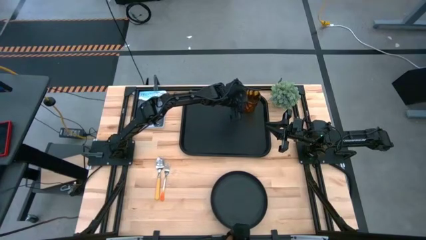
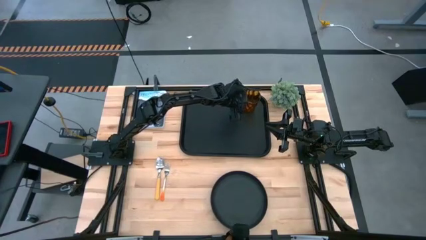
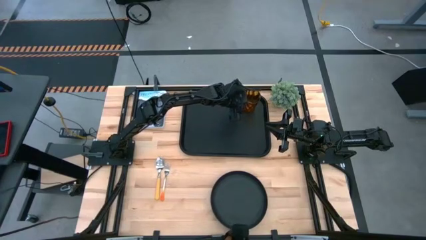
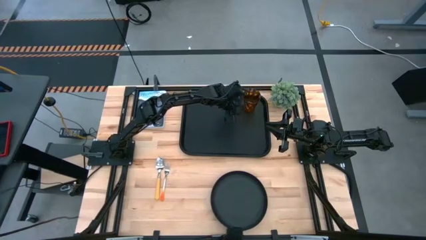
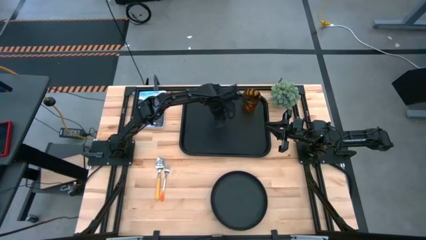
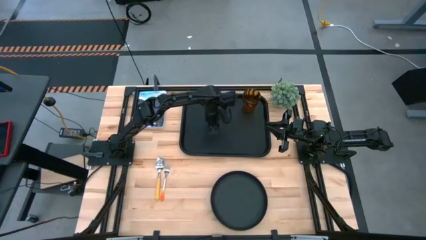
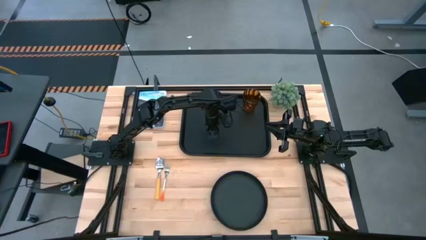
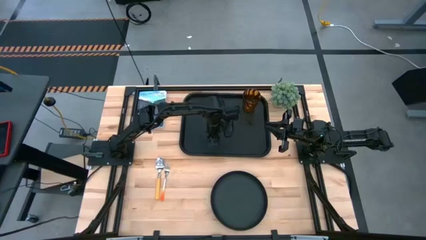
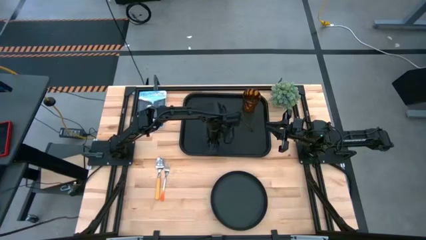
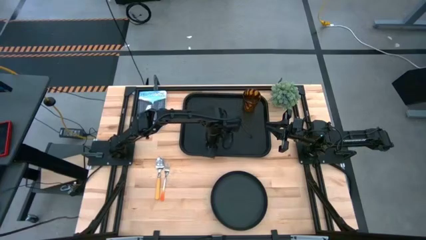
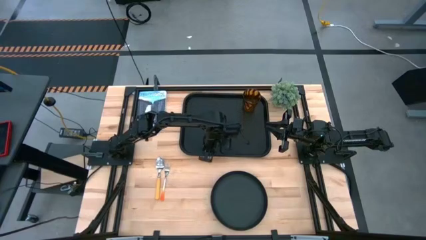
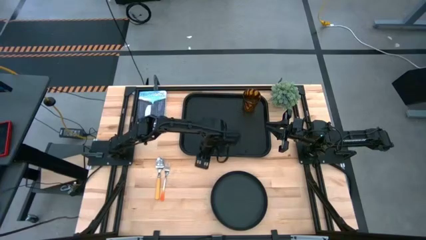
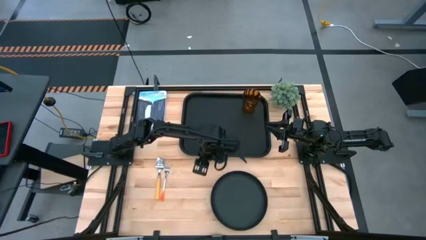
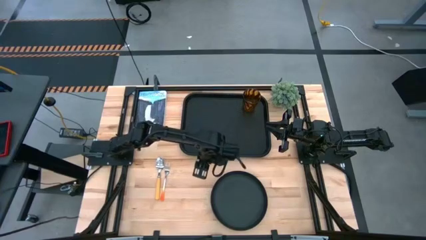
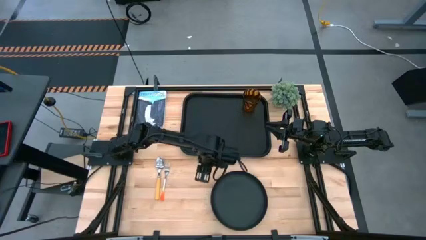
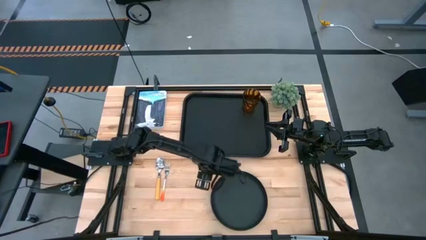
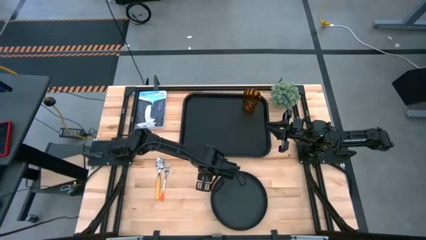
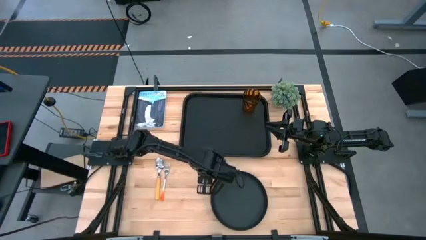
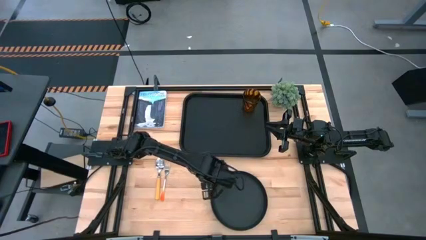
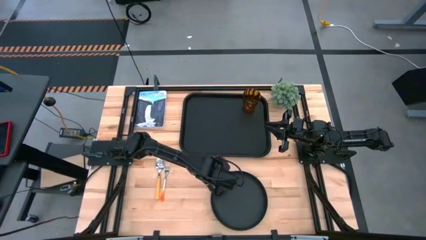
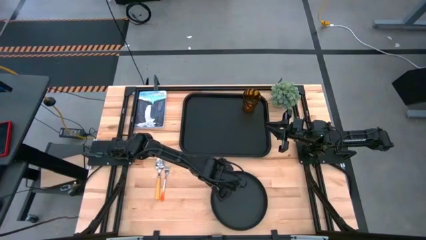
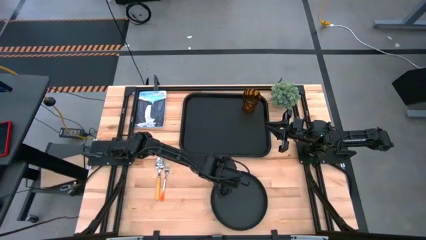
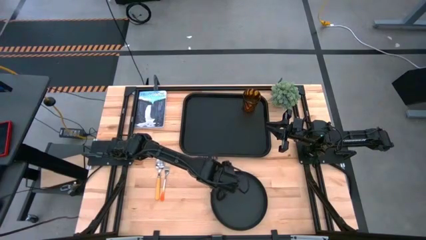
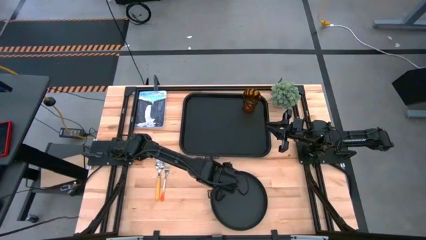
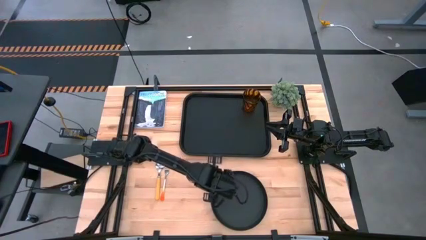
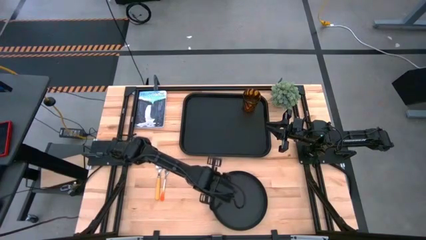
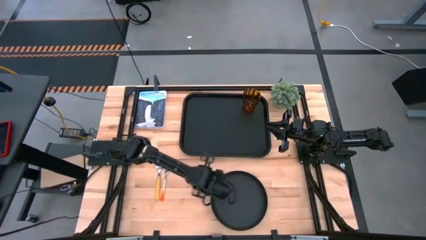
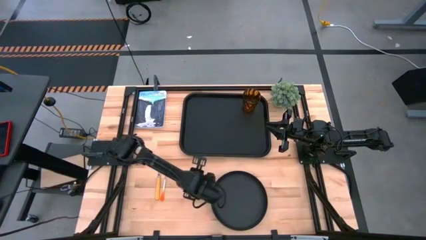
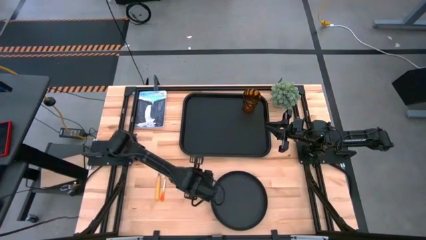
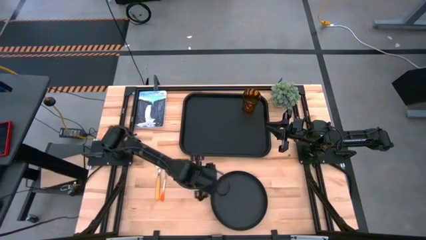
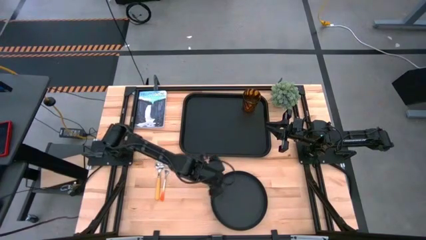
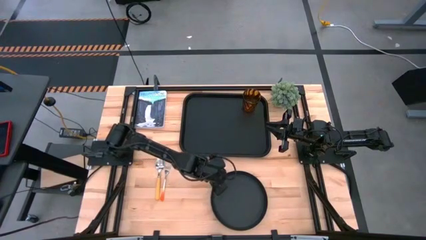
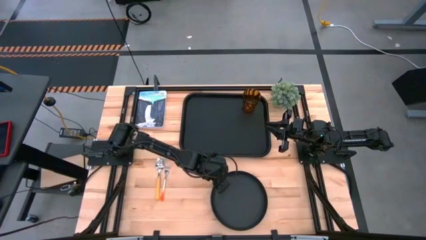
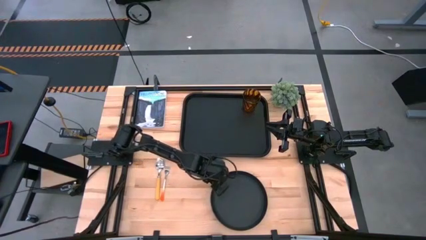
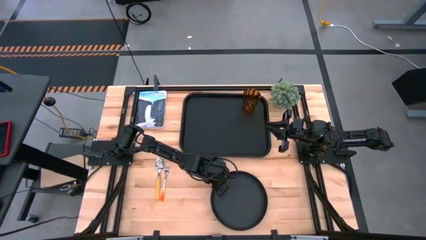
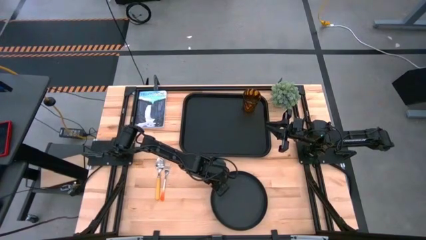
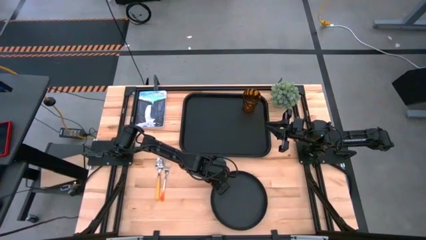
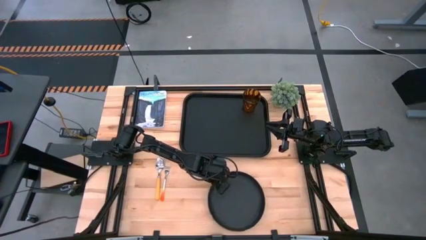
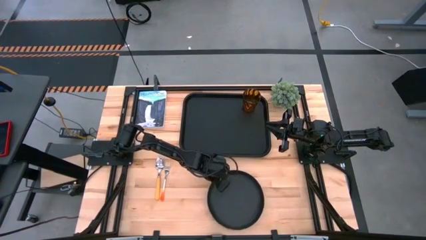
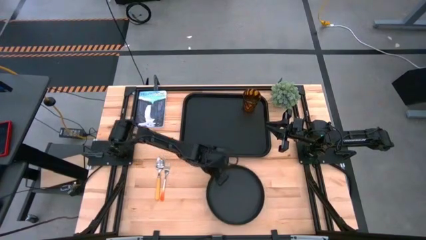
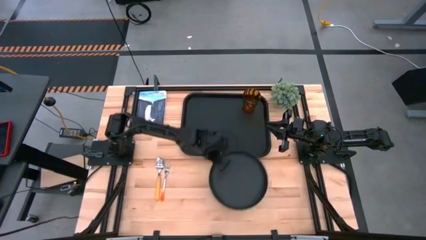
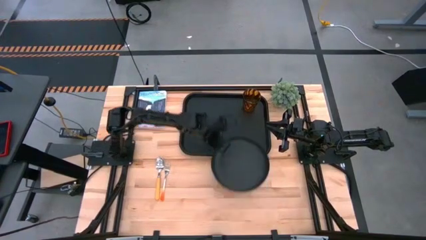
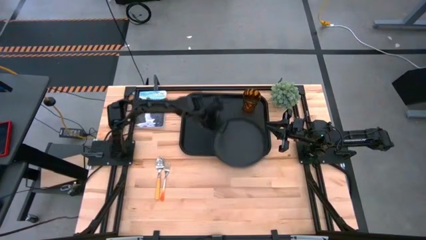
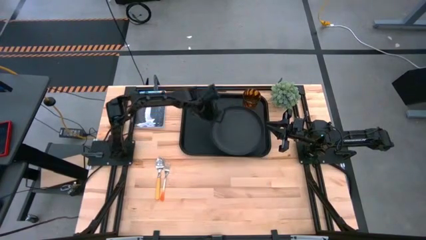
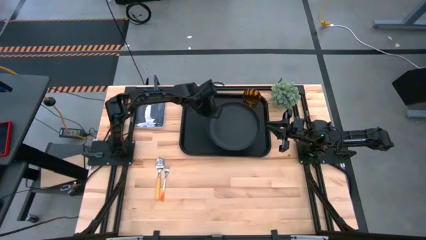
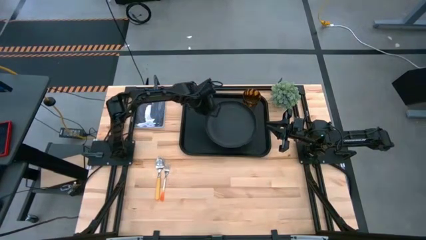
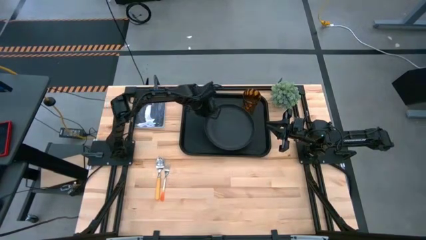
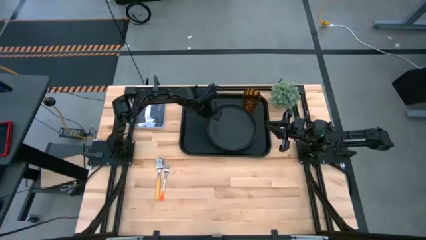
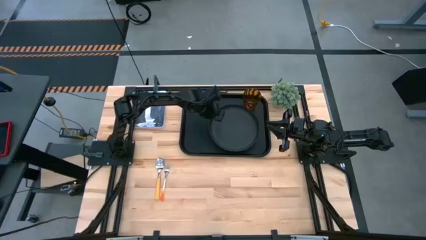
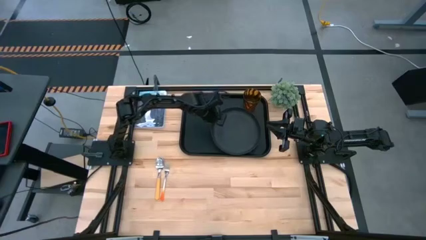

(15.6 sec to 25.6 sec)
Task: Pick and place plate/cup/fork/spoon on tray
Put the black plate to the bottom of the brown cup on the black tray
